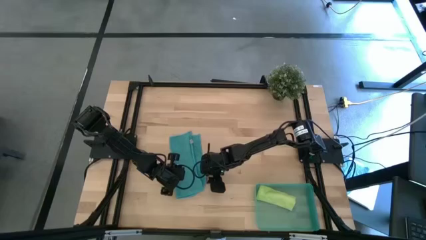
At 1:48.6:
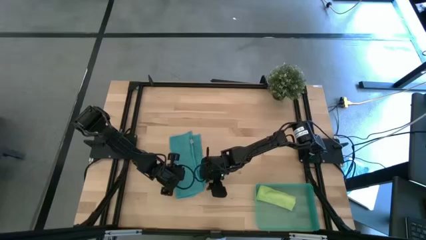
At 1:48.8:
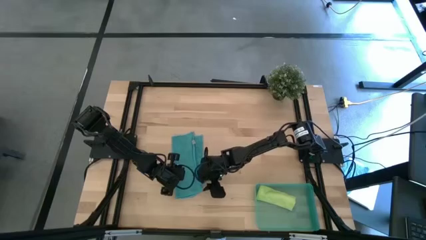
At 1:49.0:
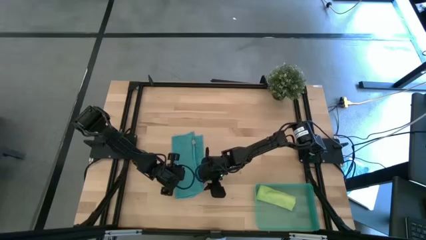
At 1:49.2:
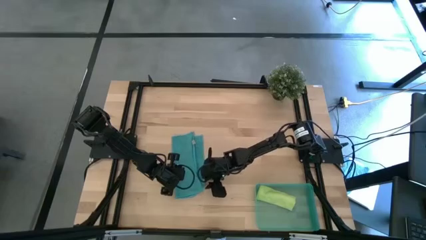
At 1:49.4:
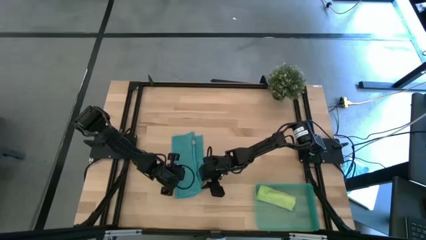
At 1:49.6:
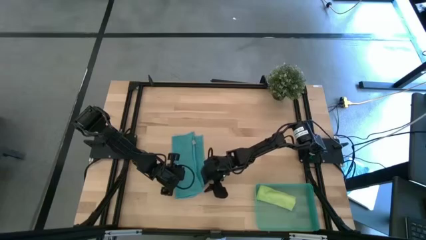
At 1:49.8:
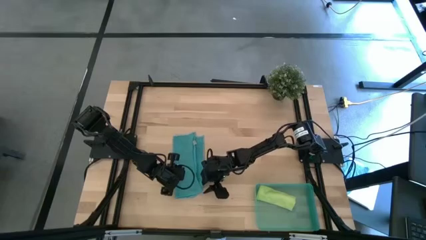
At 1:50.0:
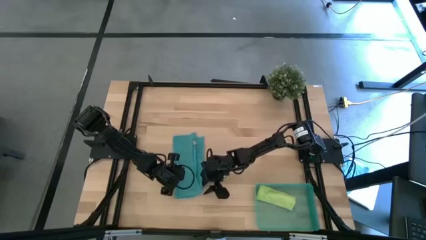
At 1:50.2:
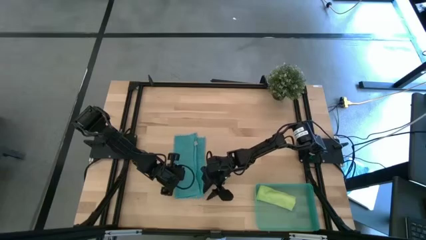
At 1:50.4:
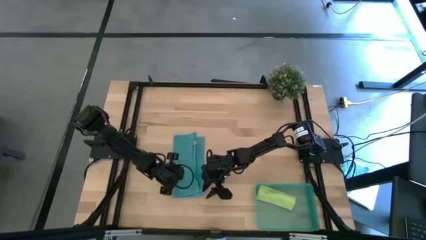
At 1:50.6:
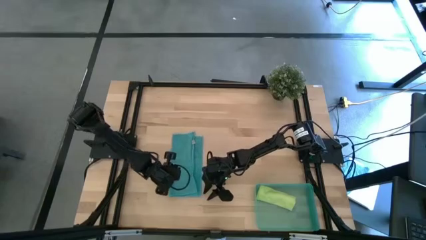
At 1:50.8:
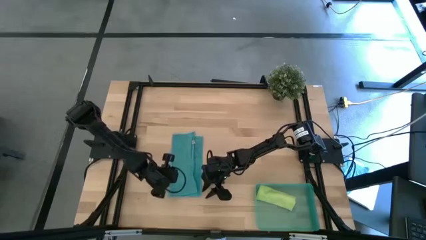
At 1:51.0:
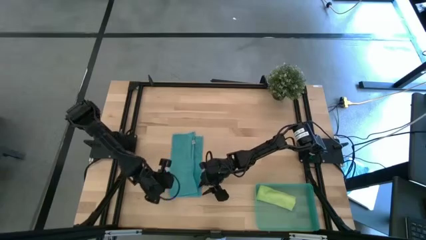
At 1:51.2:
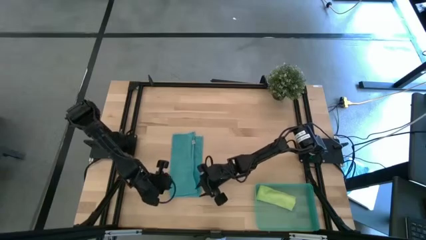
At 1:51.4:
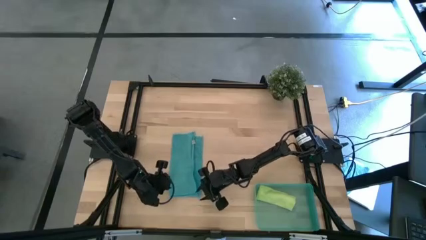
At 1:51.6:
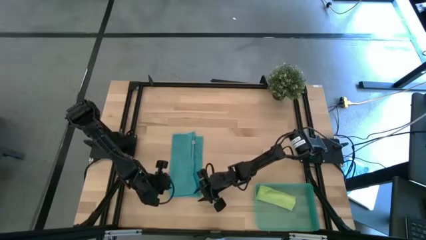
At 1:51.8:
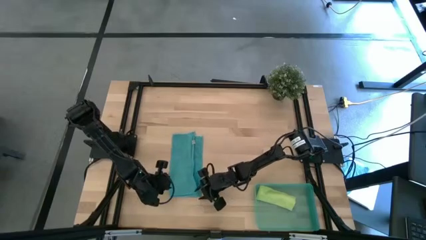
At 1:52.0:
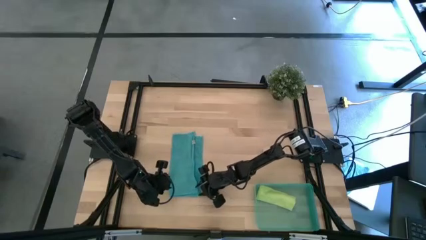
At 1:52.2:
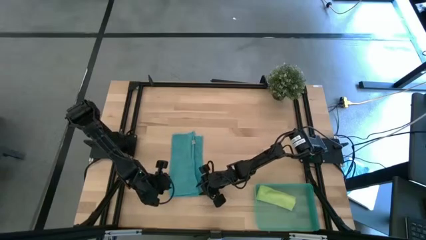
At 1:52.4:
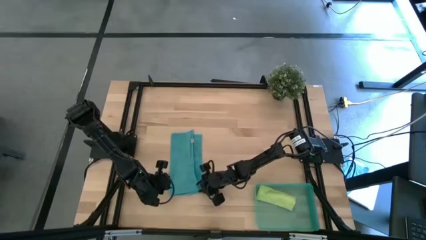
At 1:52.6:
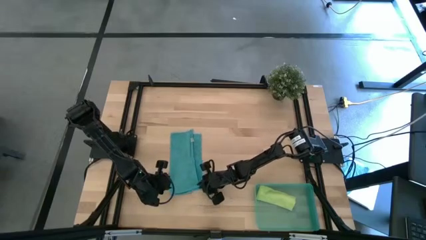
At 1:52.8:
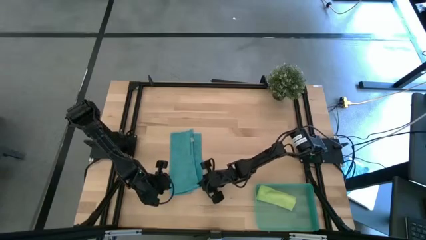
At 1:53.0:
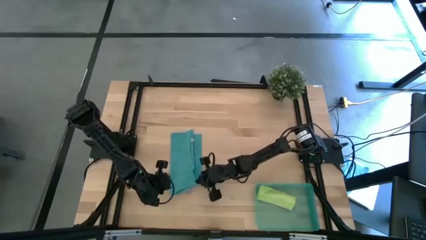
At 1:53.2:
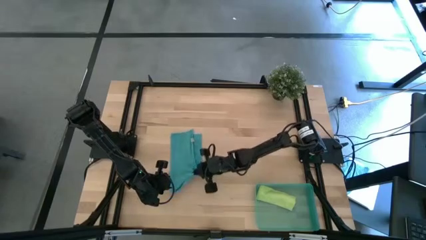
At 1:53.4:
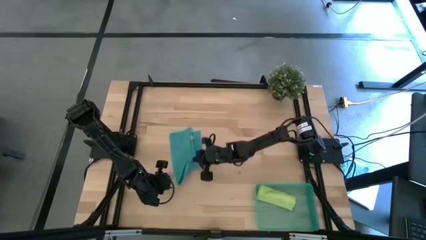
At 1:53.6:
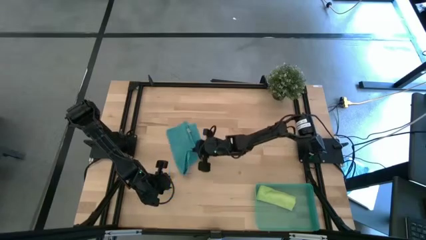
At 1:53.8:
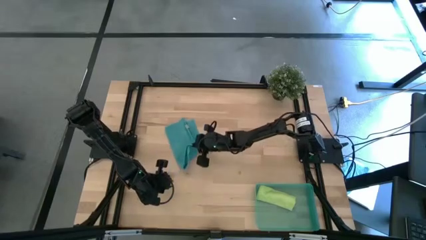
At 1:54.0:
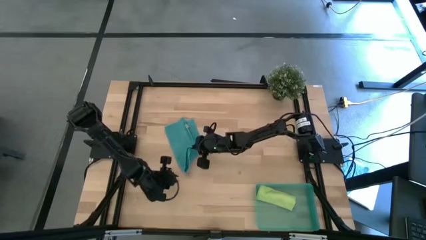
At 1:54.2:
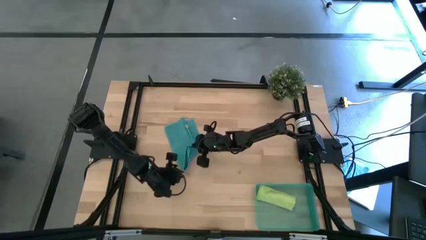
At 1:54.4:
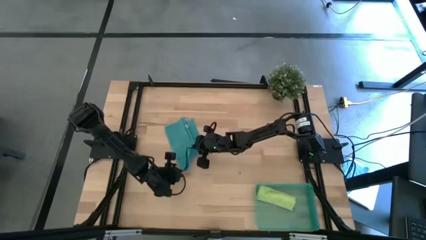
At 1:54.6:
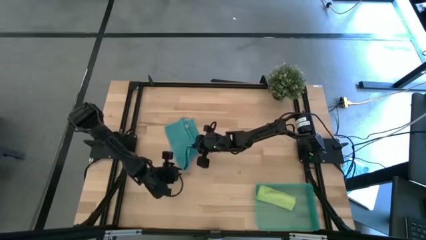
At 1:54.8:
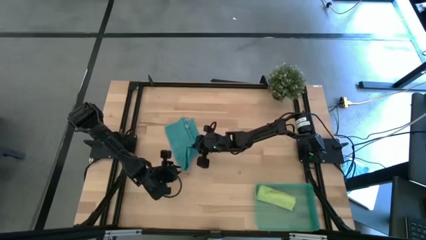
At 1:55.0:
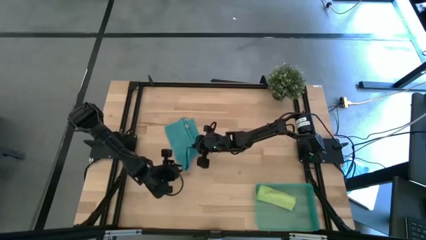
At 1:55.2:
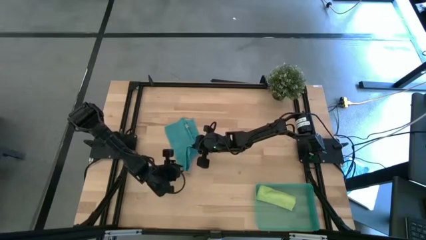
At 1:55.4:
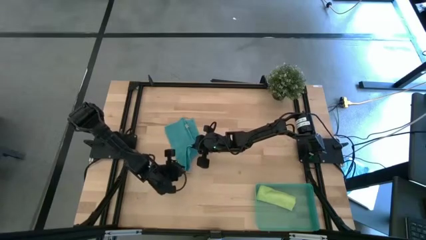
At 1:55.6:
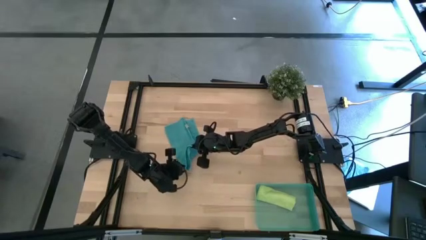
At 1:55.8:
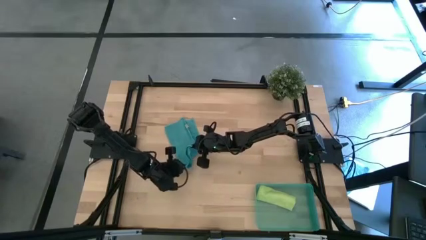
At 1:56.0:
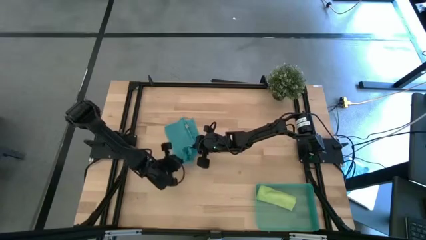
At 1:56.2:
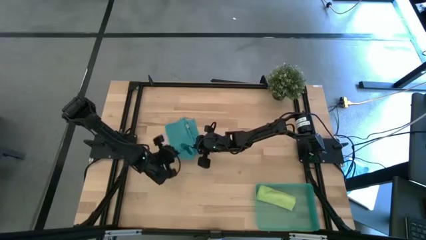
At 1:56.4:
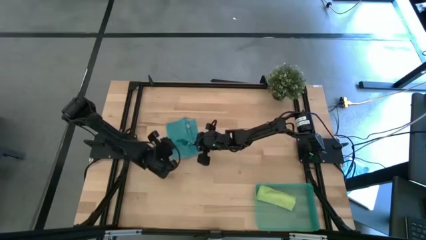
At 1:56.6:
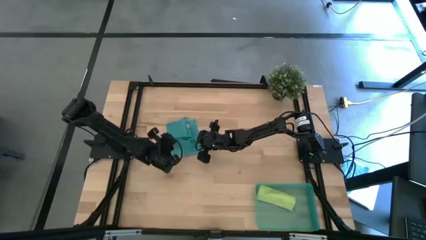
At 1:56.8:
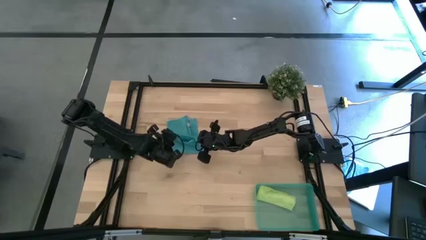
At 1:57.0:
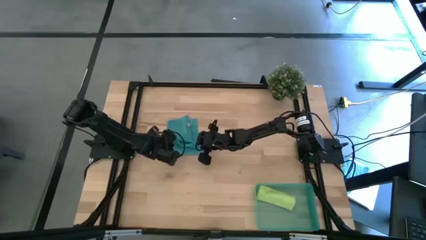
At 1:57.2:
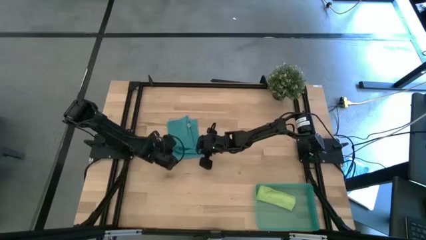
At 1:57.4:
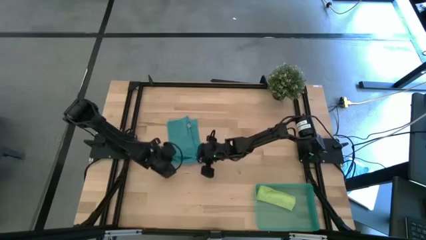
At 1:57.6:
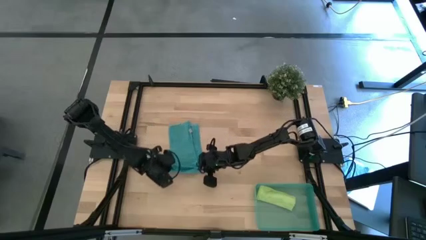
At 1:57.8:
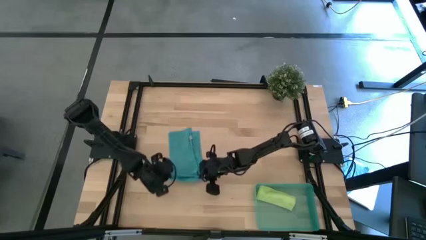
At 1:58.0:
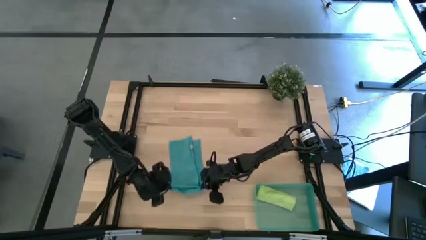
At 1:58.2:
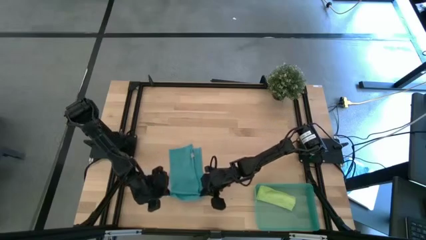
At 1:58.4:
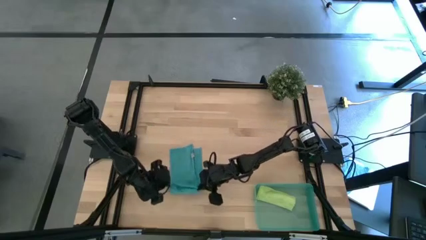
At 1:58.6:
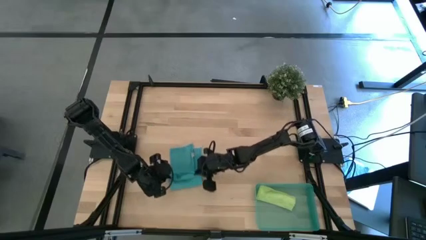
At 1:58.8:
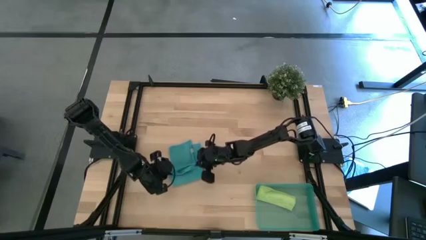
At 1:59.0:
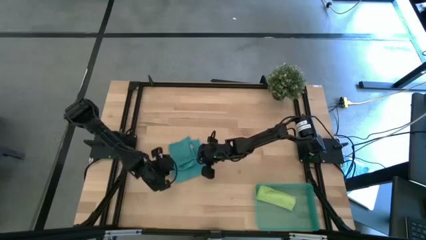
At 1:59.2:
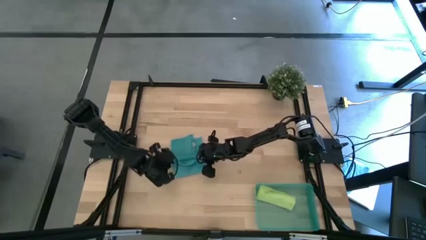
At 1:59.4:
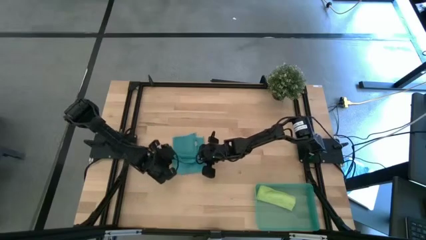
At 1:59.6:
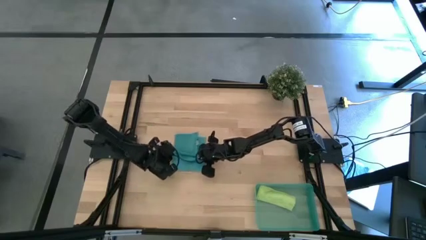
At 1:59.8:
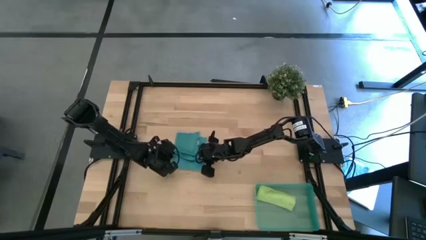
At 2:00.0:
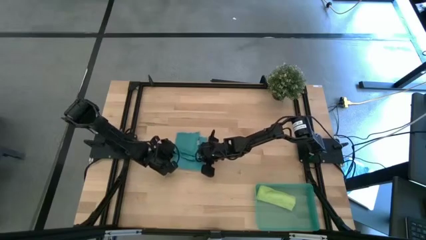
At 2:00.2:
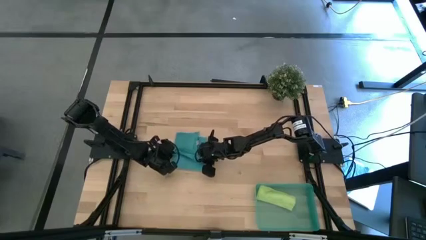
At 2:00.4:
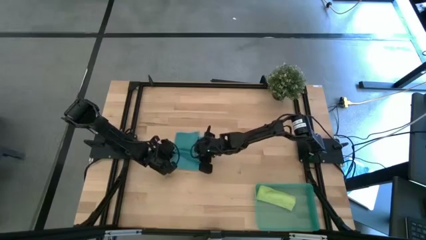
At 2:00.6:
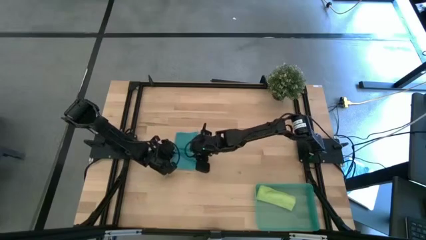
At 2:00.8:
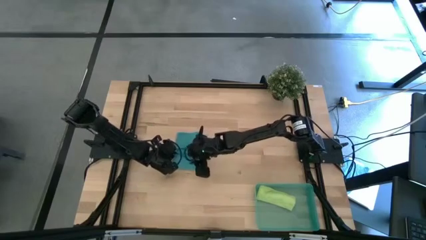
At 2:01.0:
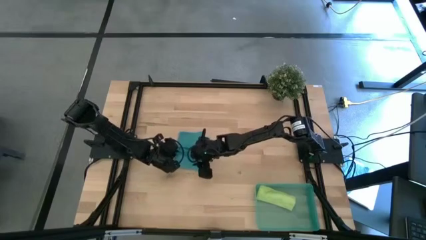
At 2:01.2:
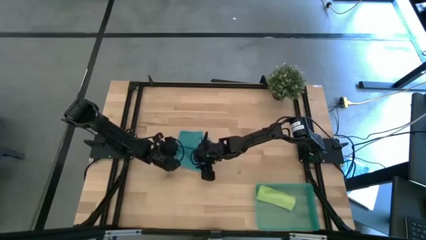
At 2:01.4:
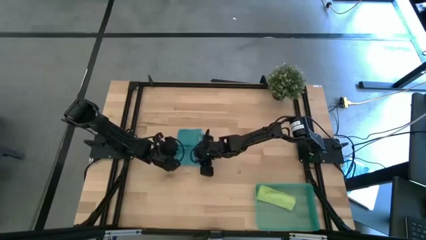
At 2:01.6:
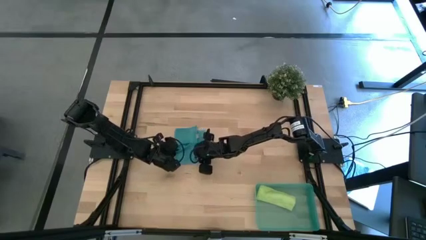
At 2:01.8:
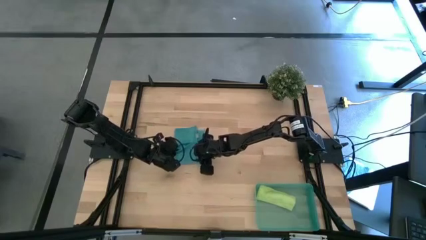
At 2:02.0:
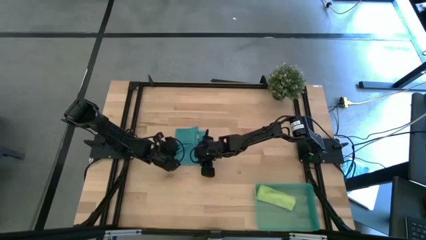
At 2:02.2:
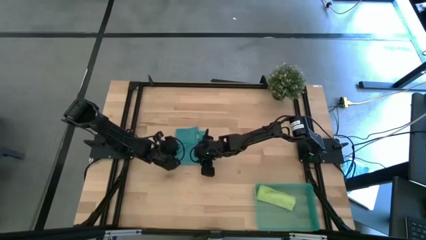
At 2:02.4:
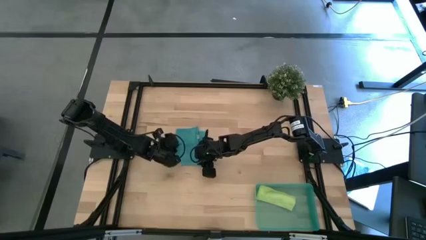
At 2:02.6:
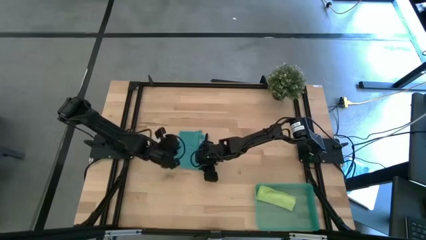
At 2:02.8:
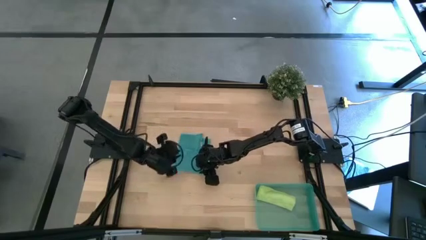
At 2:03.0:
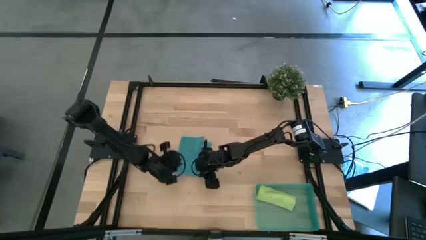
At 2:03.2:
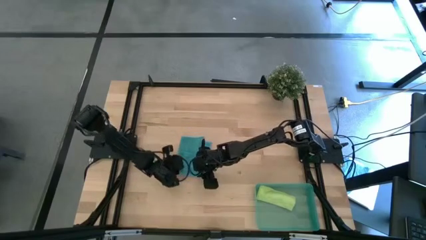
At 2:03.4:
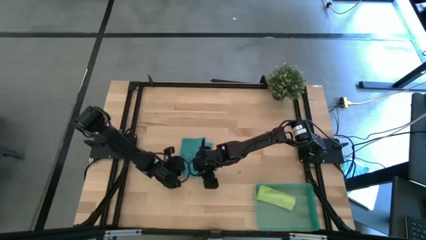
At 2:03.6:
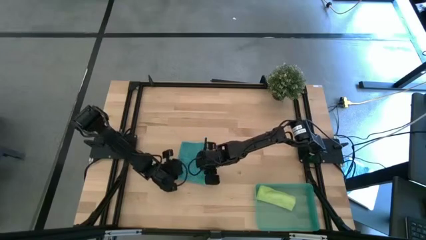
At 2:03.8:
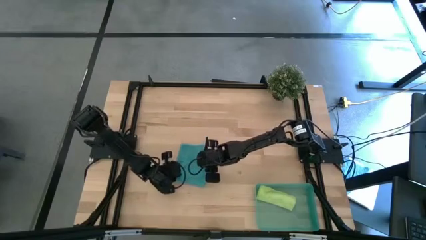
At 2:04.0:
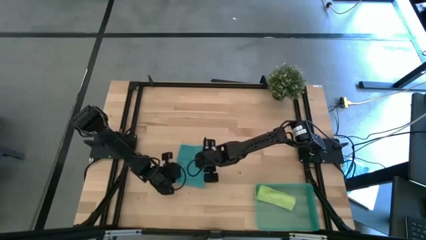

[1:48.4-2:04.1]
Task: Roll microfiber towels into tight, uniform cylinder then place into a basket
Fold the blue microfiber cloth
